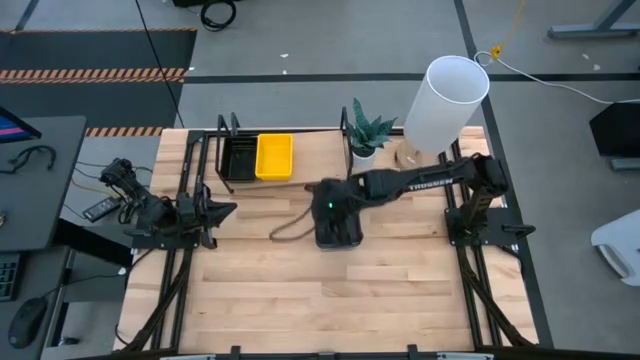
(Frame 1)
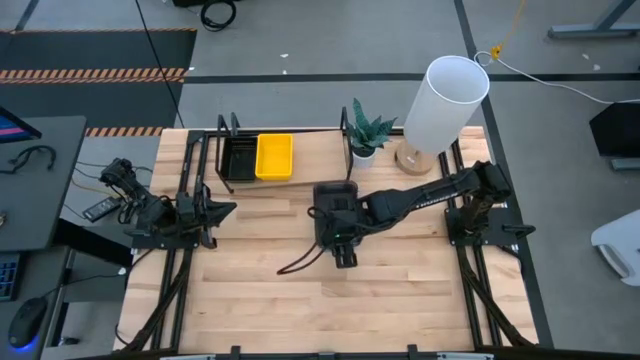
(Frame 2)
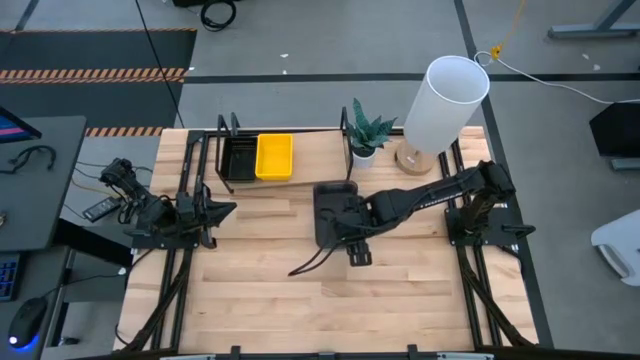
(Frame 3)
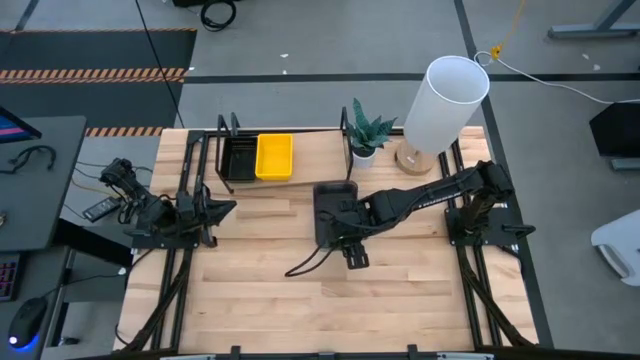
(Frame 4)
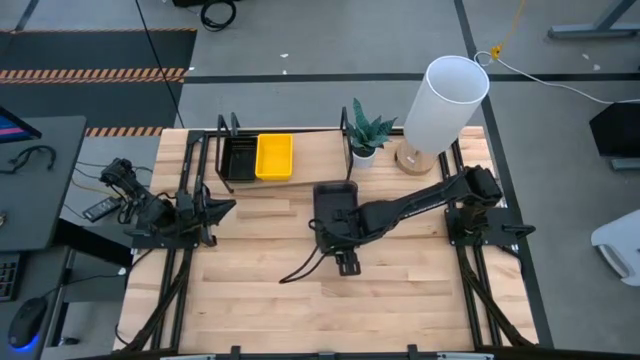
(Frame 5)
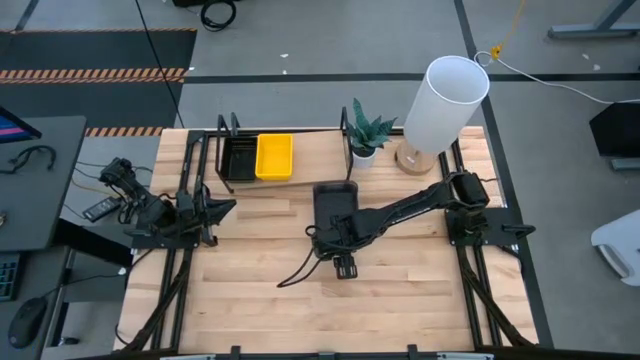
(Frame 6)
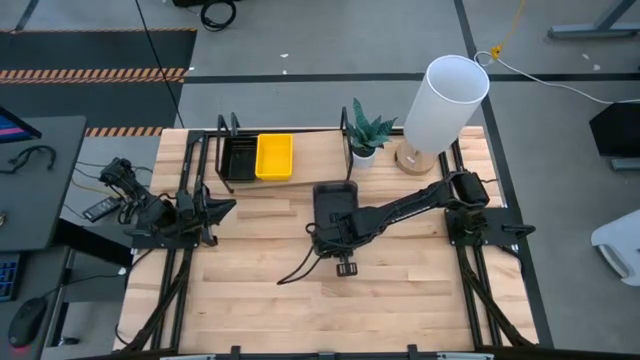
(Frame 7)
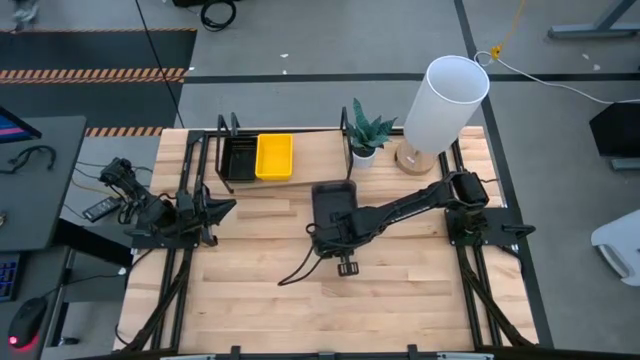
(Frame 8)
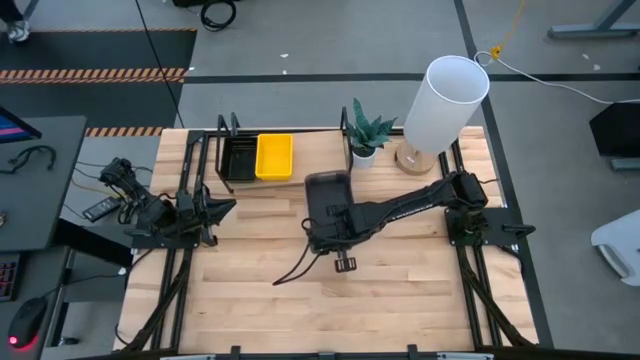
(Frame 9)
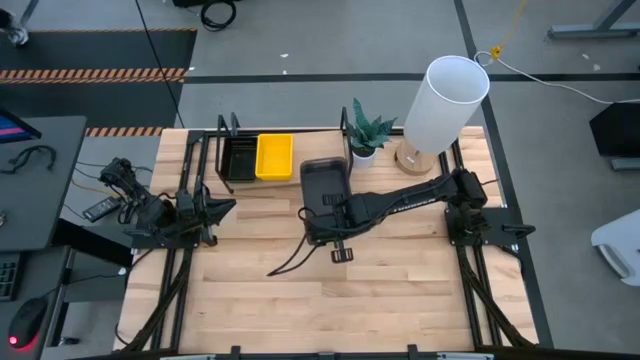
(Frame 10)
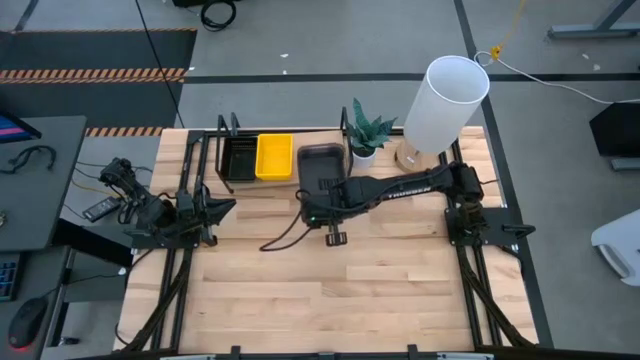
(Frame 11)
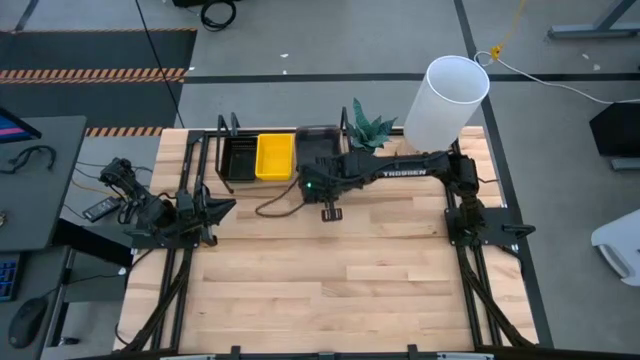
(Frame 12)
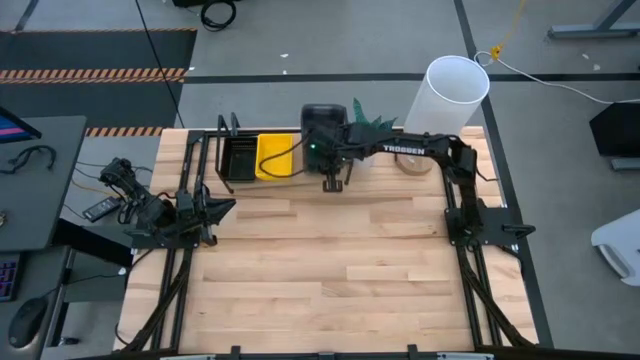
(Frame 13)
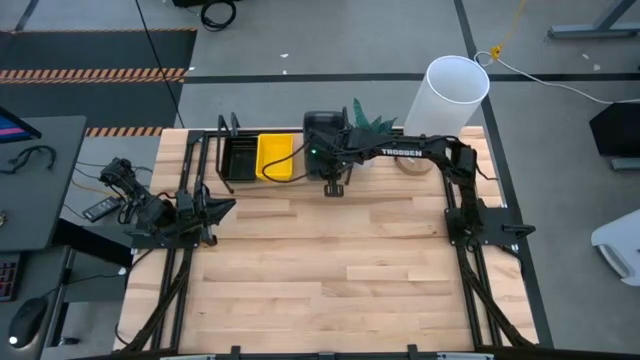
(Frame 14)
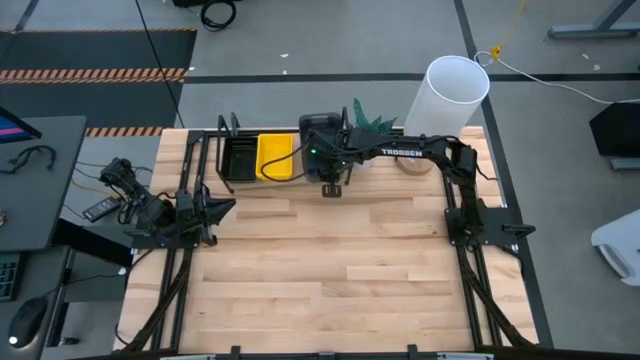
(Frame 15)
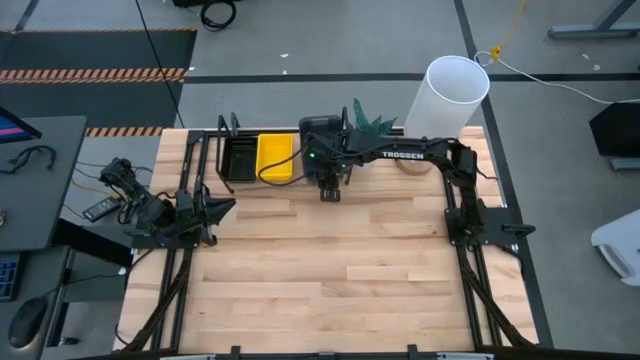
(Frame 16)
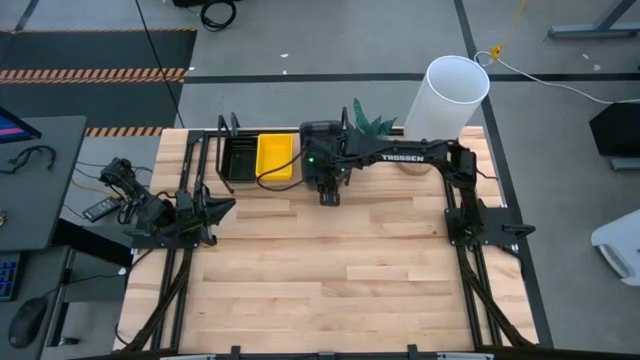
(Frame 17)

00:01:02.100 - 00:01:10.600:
Task: Stack baskets on shelf by color
Put the stacked black bins on the shelf aligned with the stacked bins

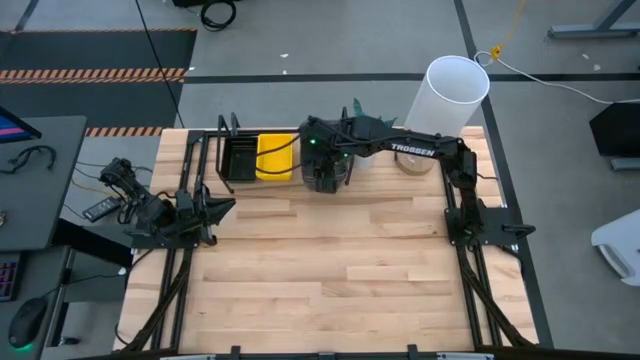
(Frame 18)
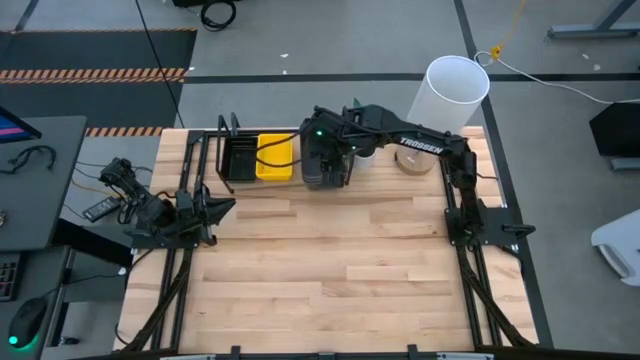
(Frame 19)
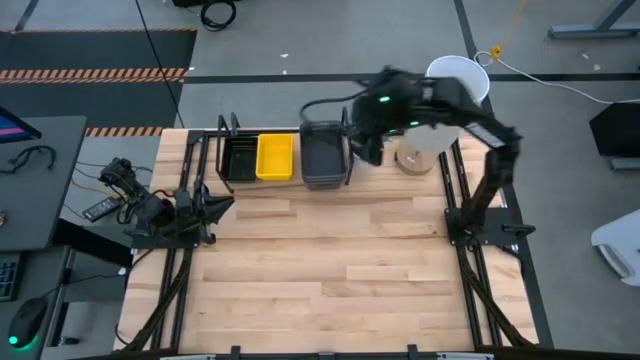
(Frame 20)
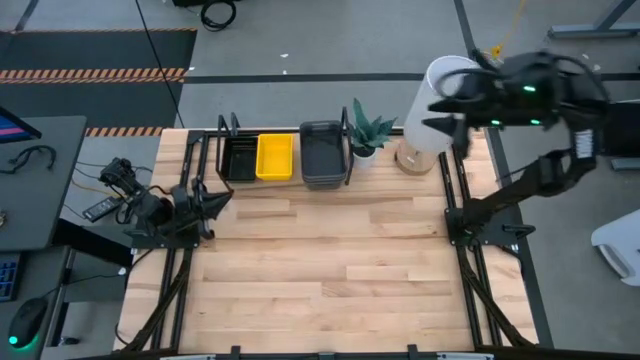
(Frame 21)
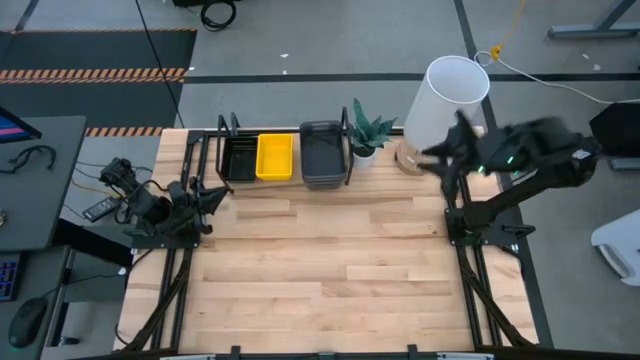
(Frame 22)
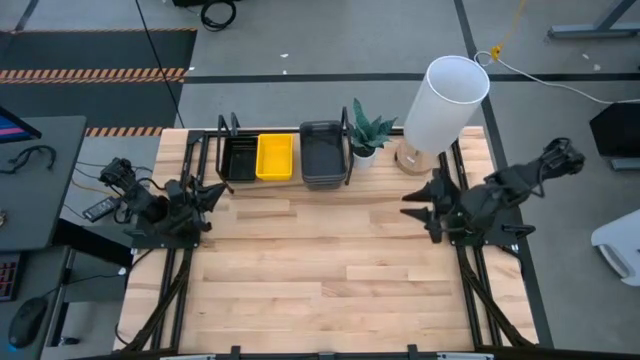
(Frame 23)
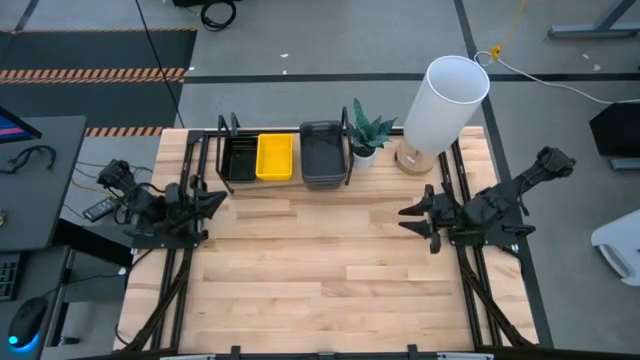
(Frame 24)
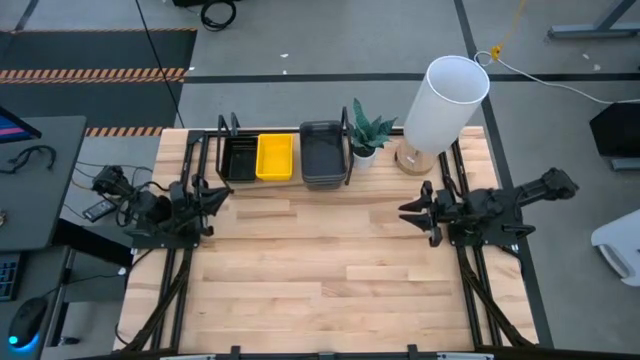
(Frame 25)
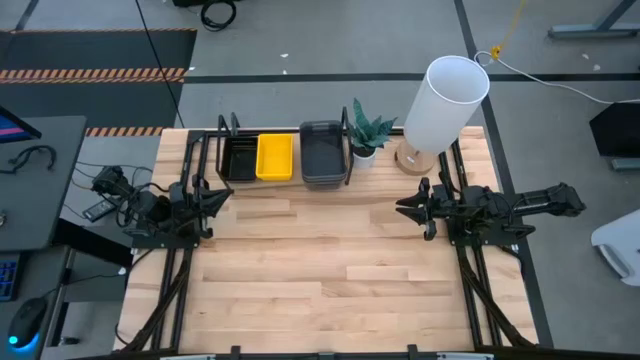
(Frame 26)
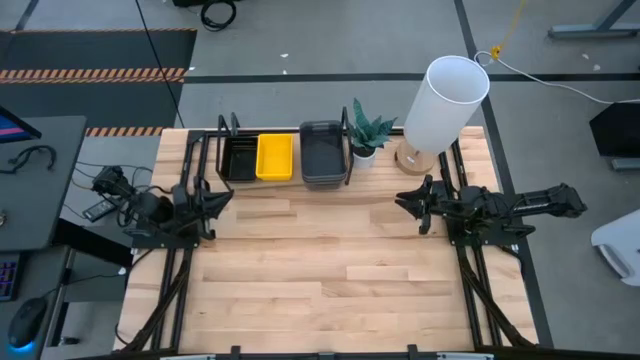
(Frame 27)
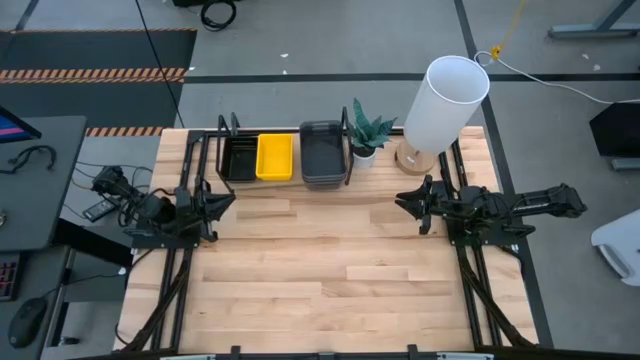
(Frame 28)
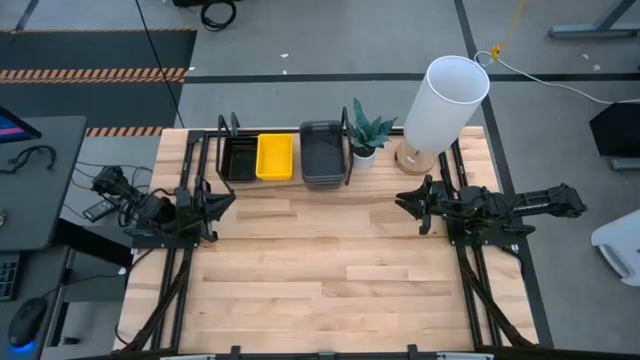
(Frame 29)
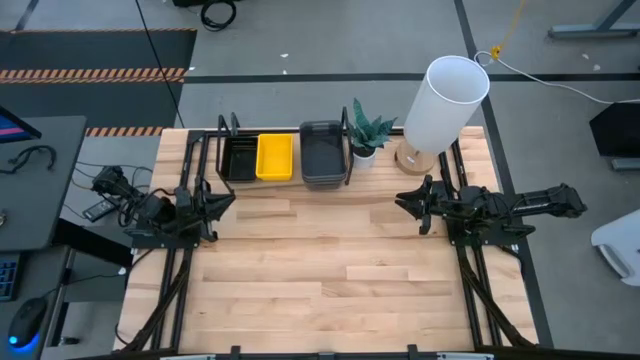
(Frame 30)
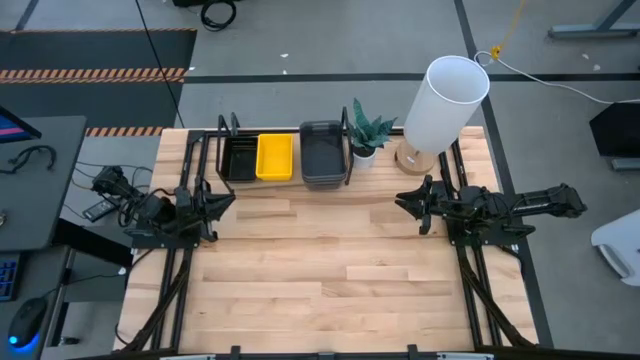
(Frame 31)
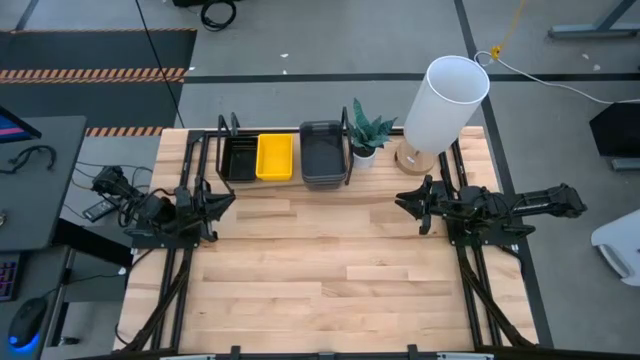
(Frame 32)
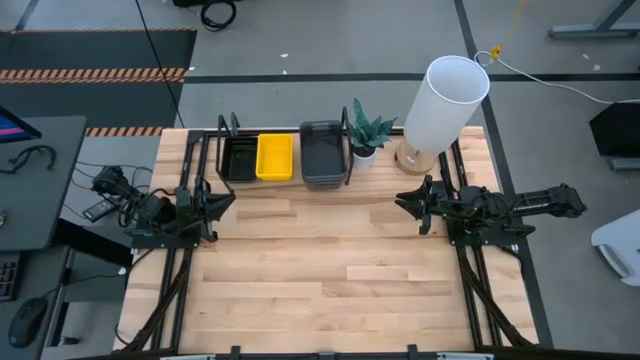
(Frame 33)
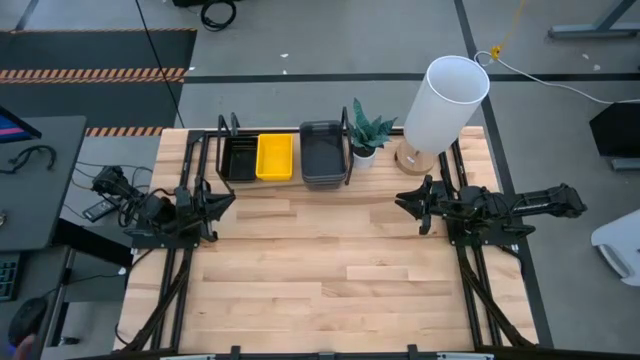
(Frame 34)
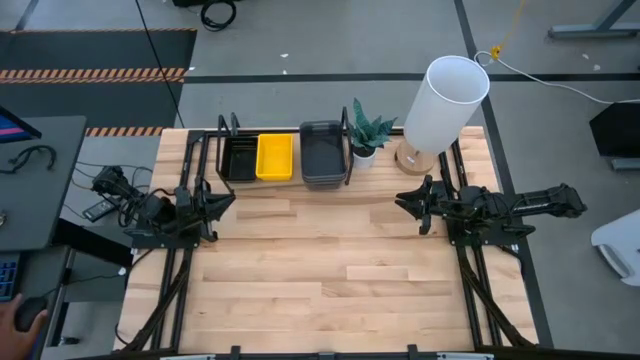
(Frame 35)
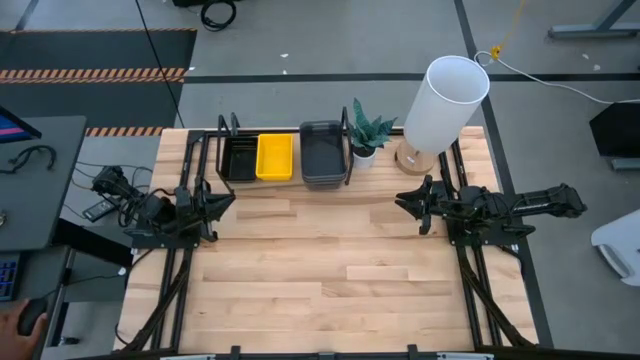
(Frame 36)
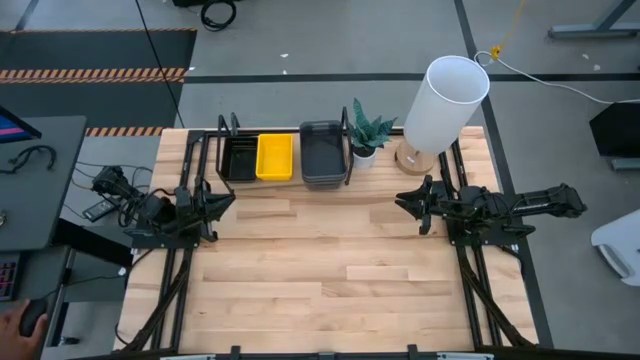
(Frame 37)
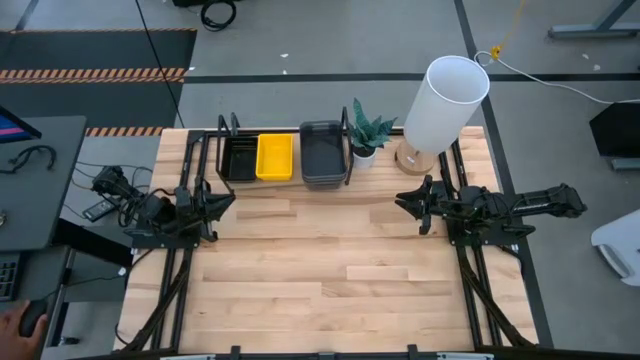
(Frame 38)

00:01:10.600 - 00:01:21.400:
Return to Home Position

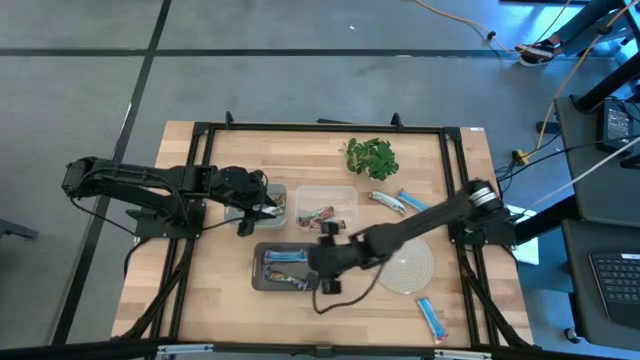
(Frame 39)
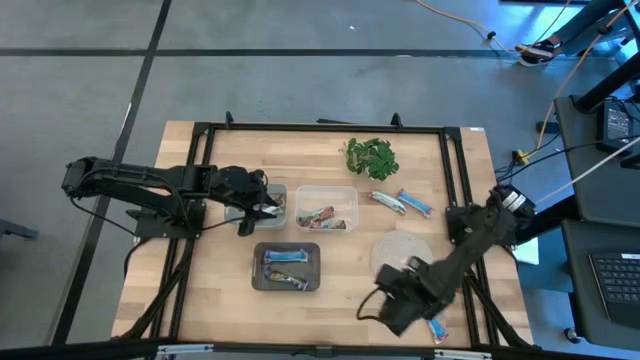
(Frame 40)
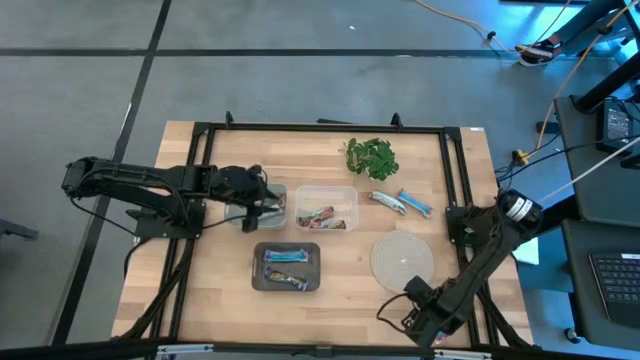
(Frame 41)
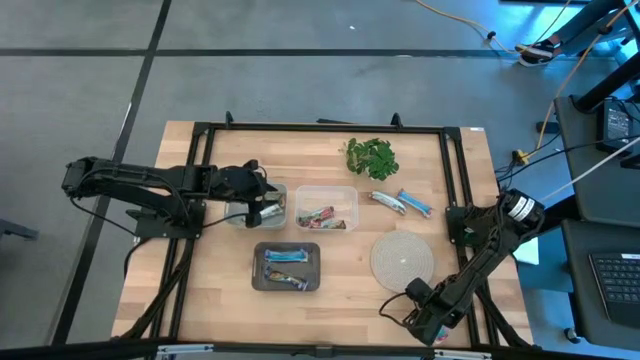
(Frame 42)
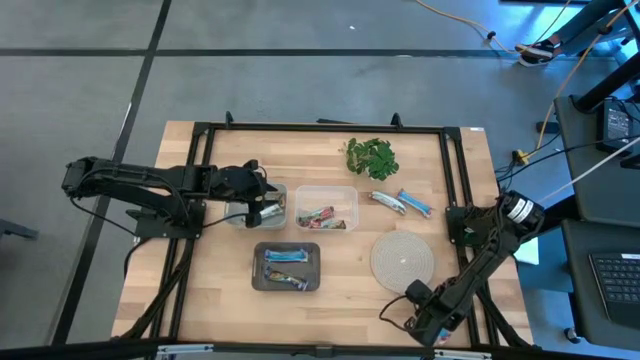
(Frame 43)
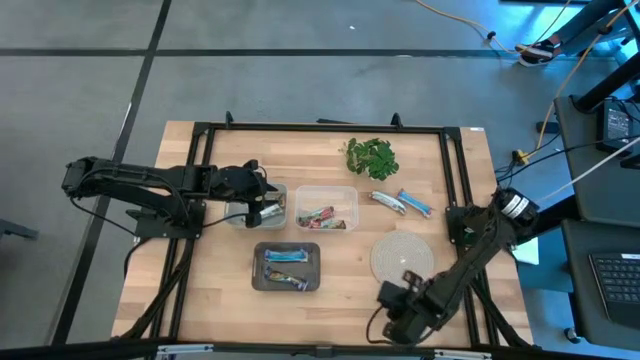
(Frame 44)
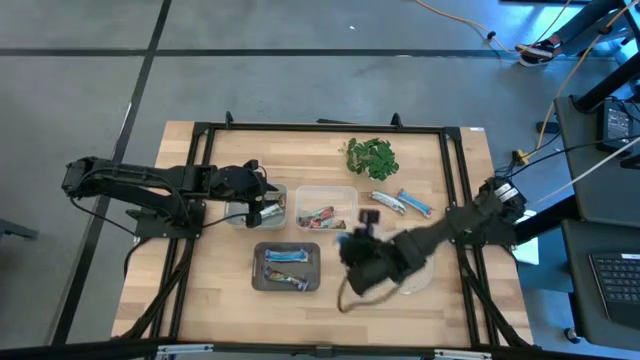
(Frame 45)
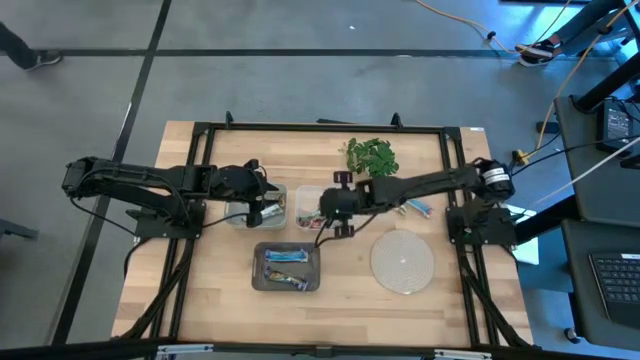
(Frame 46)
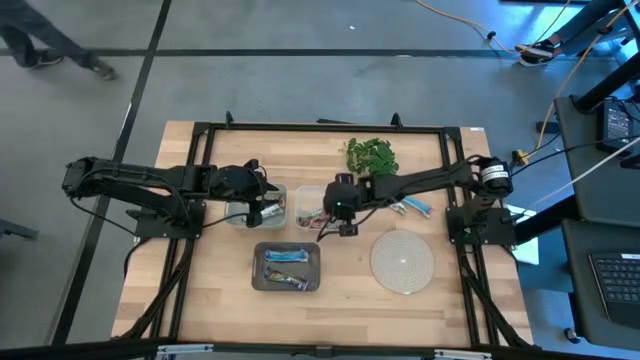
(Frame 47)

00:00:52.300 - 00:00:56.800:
Task: Pick and place Granola Bars by type
Put the red granola bar into the white transparent bin
